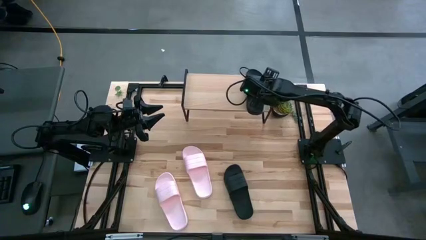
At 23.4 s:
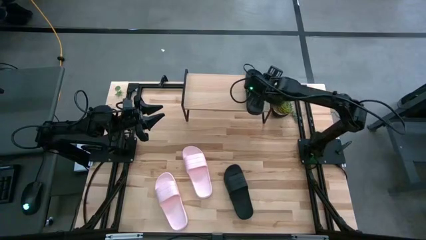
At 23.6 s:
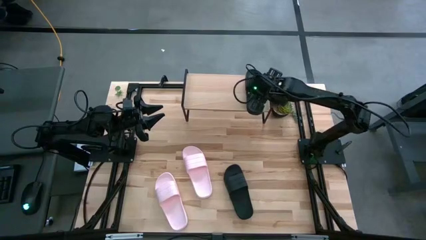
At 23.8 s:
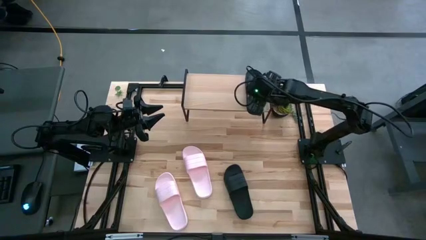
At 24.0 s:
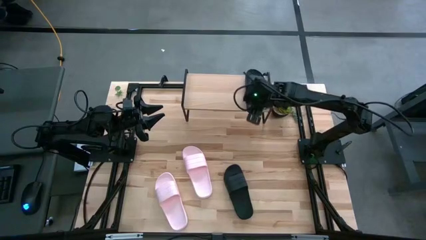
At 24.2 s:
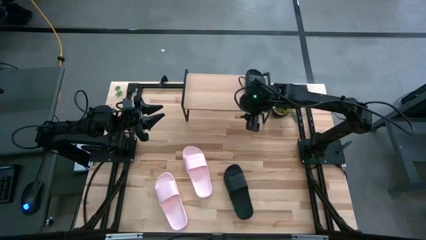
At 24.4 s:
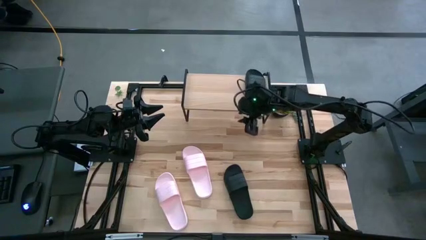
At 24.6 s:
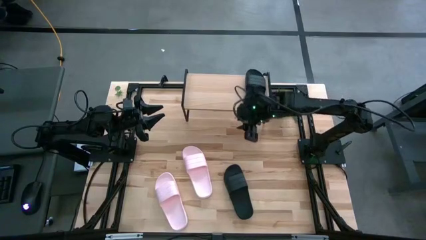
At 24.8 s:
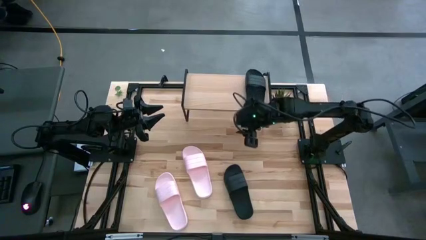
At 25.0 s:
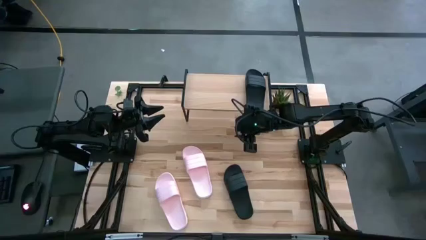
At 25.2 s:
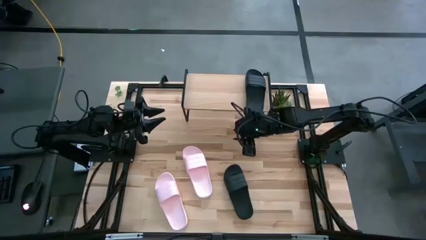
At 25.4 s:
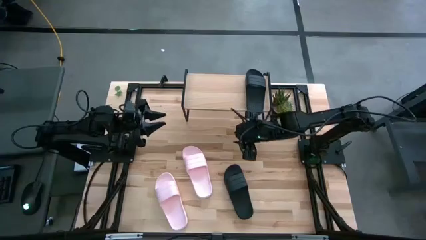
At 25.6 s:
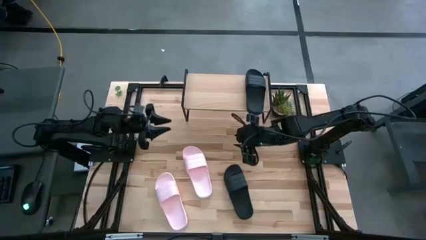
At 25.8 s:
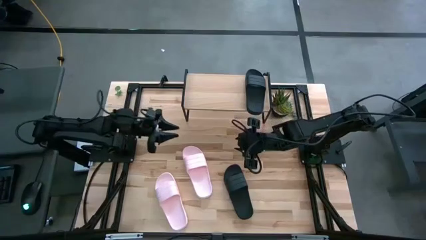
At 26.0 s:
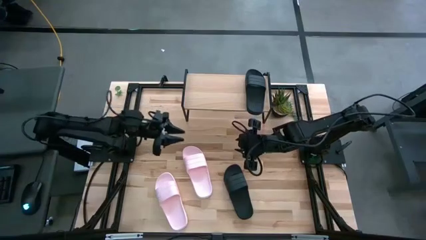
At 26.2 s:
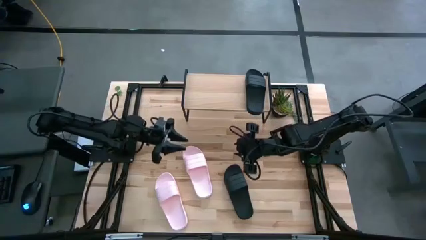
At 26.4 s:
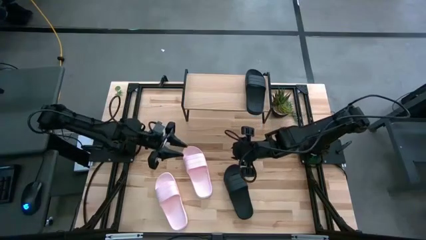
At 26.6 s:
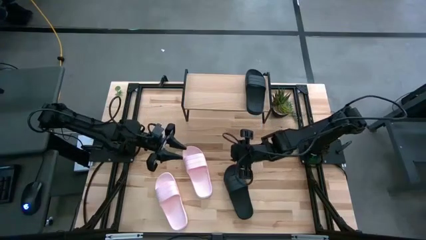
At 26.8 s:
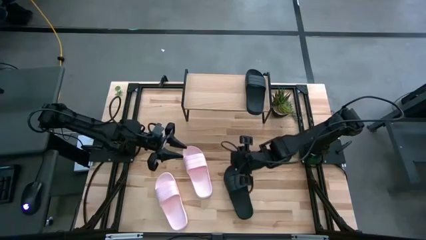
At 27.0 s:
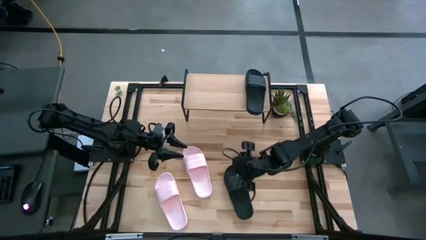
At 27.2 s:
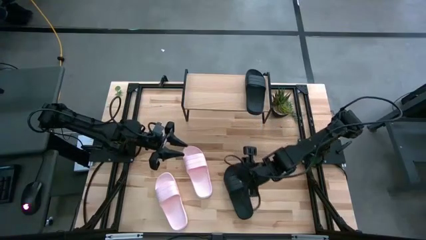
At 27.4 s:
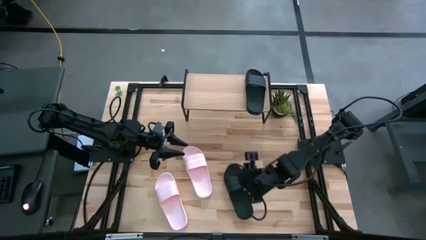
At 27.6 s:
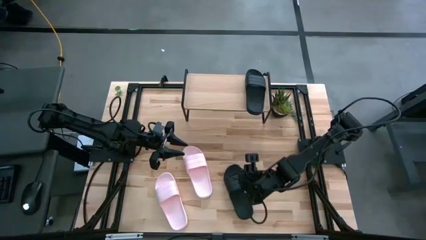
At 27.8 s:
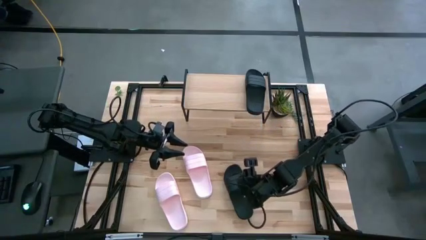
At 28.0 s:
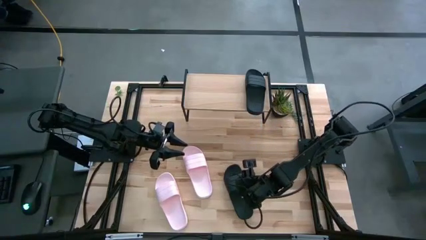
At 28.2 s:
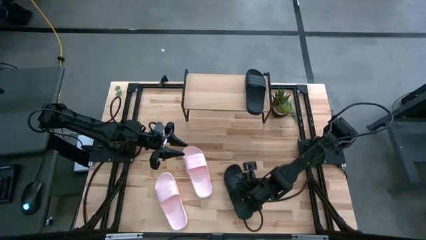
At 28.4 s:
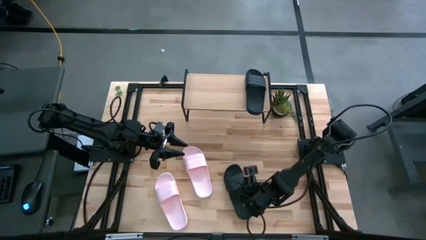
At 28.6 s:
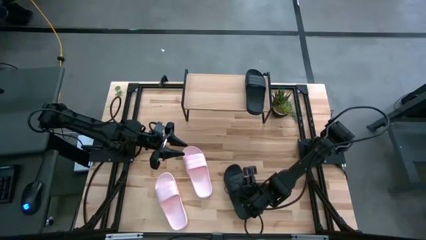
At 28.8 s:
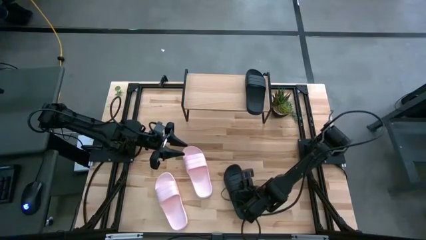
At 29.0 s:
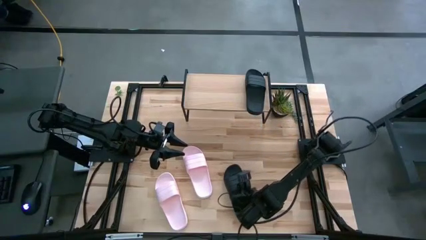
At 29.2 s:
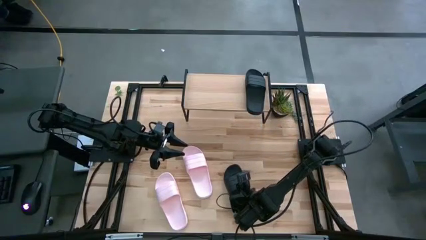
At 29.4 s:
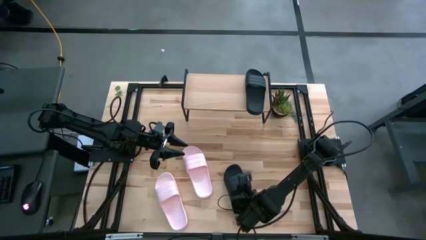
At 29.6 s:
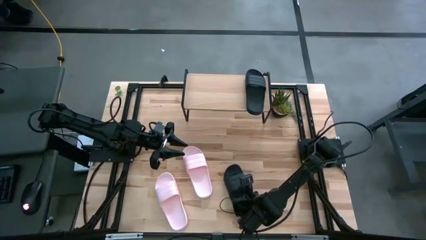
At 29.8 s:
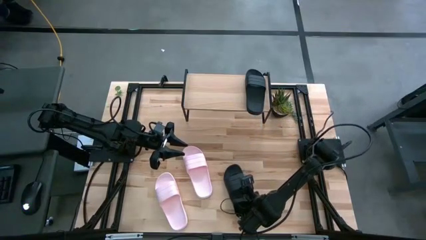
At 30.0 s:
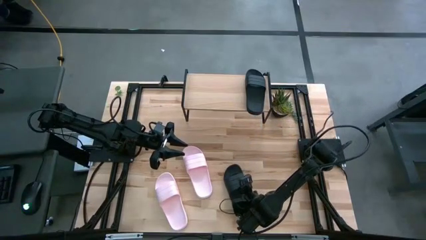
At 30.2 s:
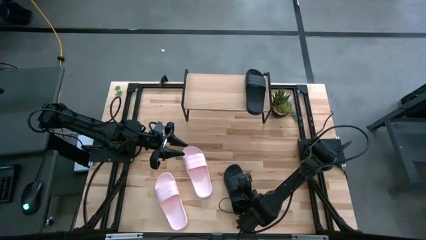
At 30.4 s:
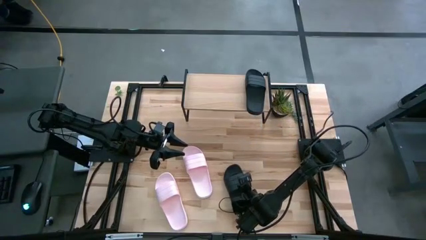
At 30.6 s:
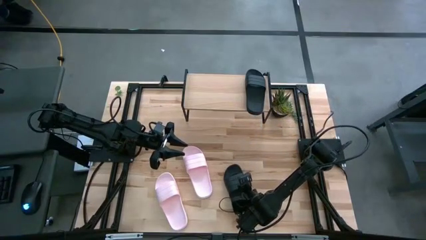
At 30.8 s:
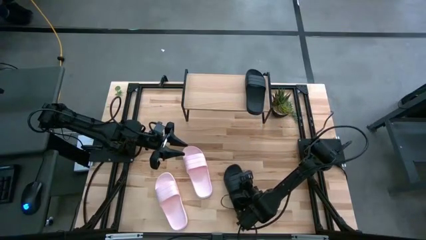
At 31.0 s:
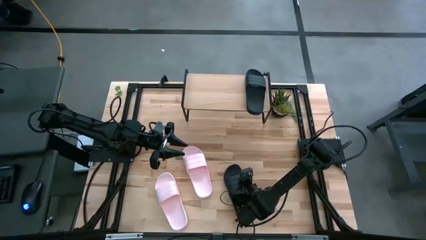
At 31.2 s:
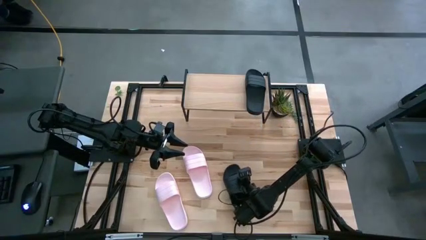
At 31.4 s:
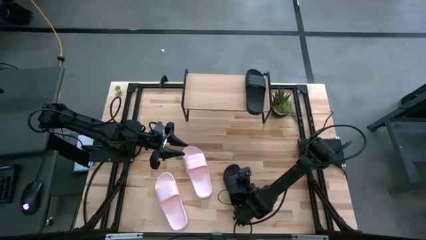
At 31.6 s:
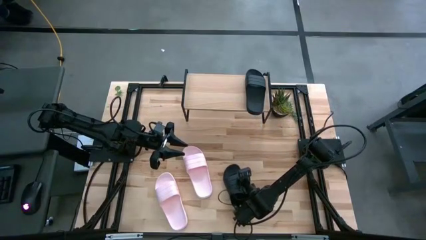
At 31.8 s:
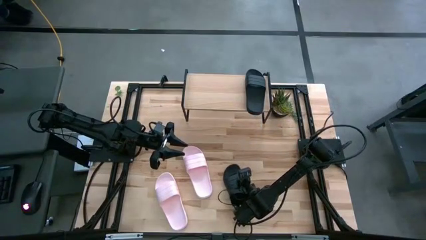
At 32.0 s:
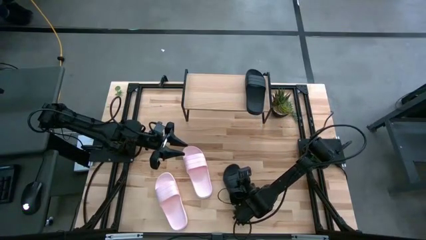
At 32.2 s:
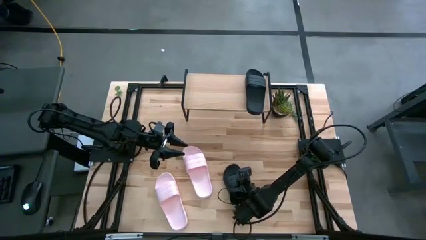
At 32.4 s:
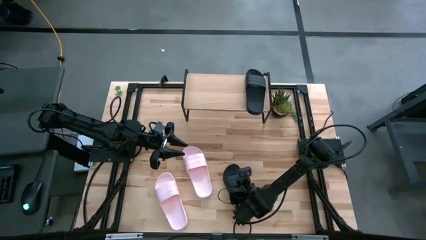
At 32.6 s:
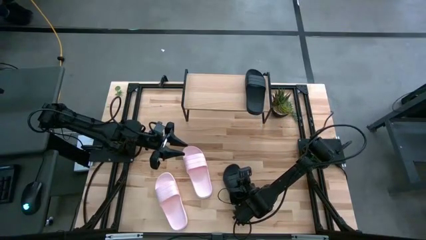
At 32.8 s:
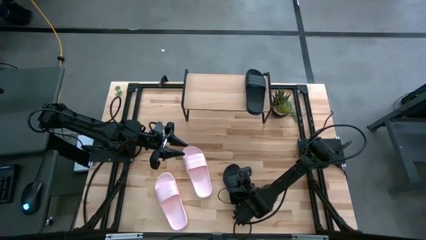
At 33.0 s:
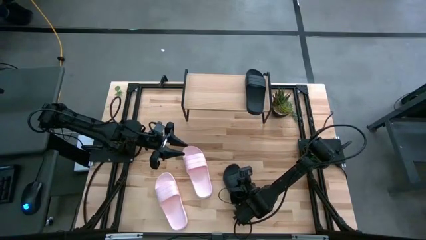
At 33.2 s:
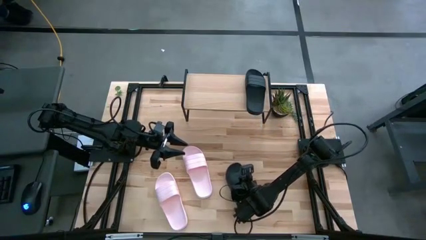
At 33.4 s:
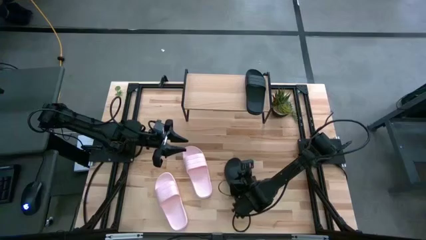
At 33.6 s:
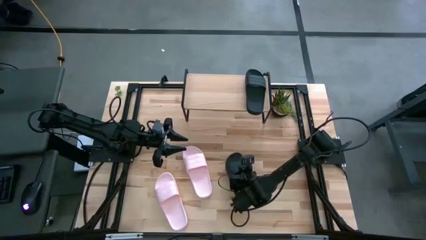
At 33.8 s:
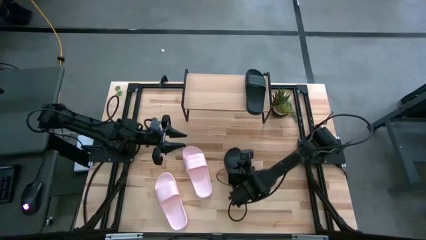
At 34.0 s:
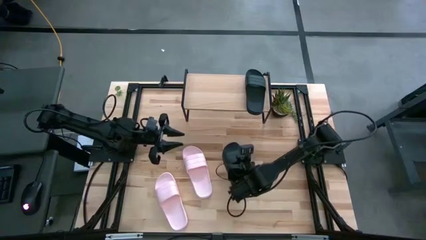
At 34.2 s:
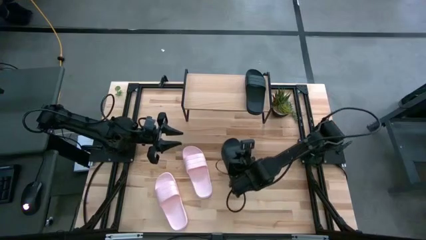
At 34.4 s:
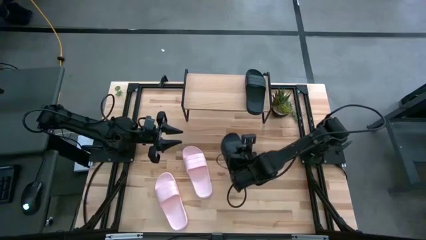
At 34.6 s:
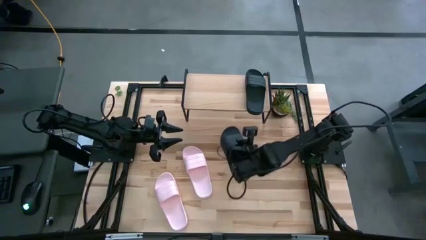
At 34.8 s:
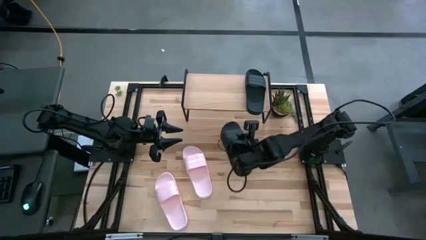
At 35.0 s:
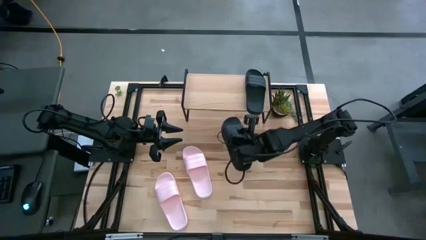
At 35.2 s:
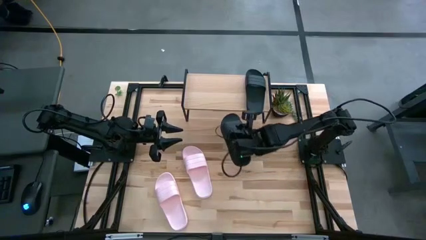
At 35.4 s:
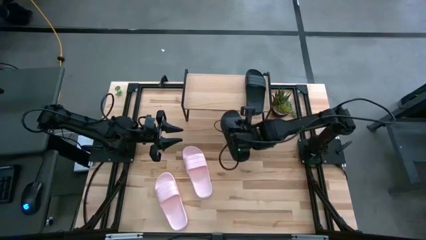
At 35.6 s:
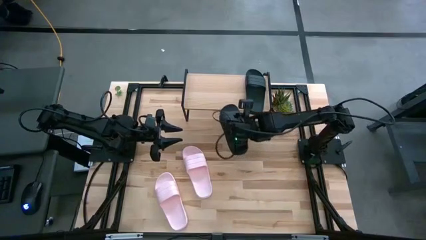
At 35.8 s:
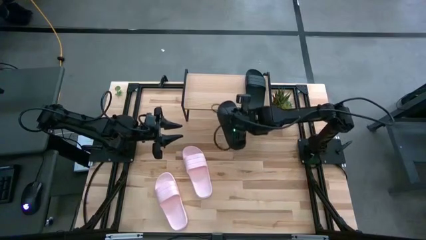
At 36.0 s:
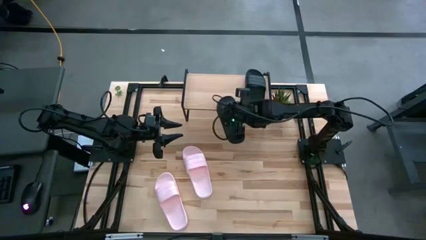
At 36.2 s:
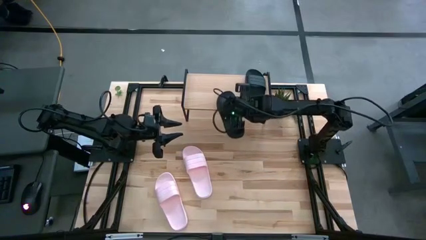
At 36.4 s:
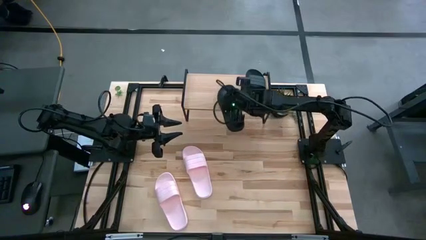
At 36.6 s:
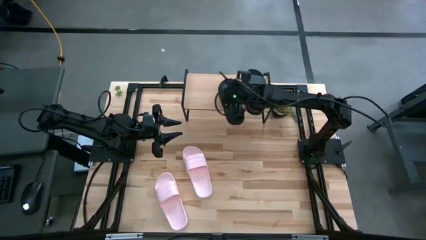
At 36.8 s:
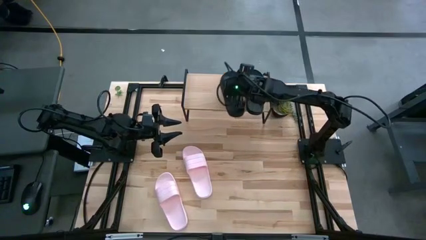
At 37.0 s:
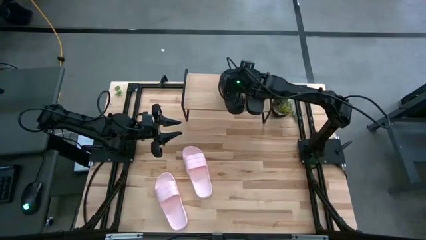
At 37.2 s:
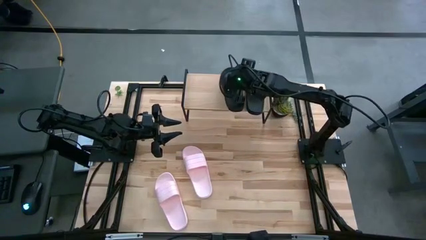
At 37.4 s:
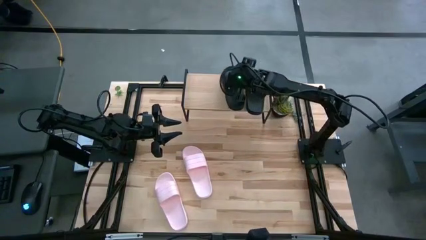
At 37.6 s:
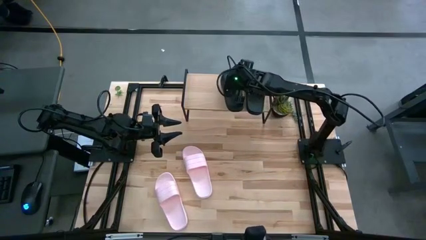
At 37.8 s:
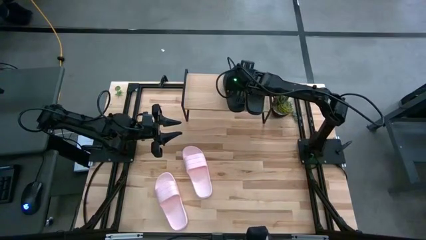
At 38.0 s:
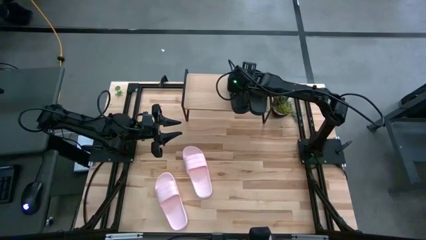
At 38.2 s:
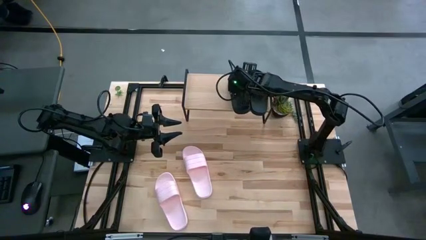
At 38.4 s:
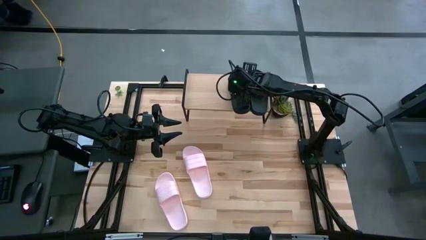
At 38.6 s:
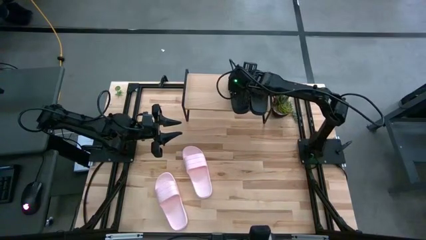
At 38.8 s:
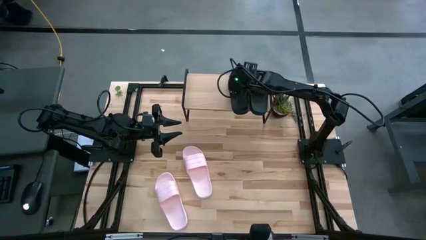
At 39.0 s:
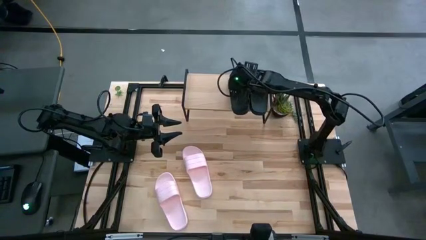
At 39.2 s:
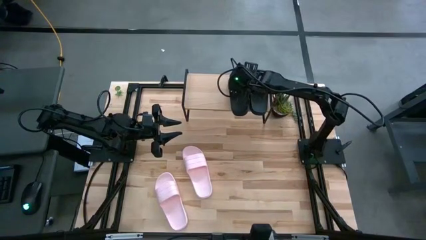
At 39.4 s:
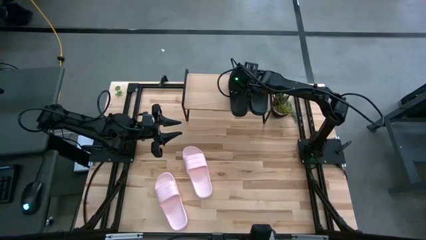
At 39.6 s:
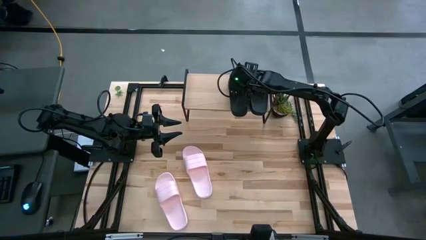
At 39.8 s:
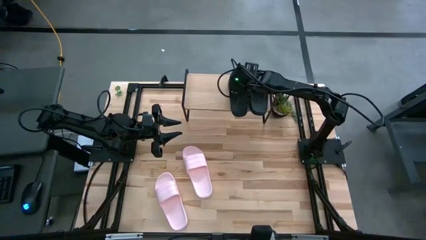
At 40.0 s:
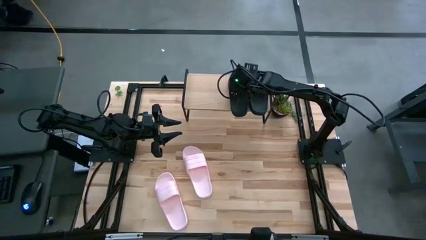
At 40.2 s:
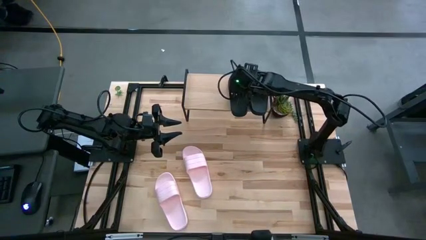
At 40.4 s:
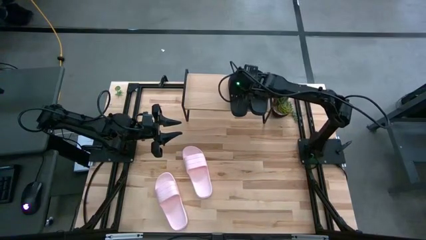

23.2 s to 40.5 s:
Task: Pick and place slides into the shelf
Put the black slipper on the shelf
